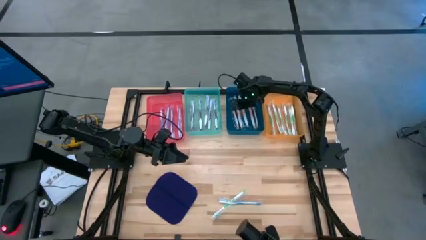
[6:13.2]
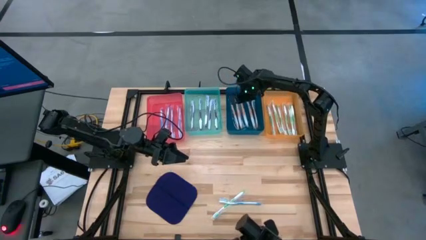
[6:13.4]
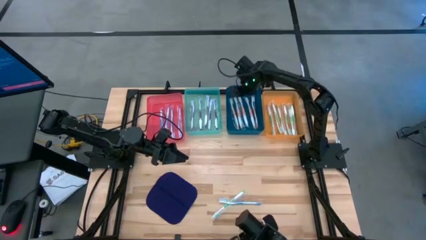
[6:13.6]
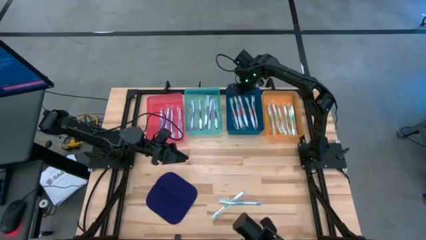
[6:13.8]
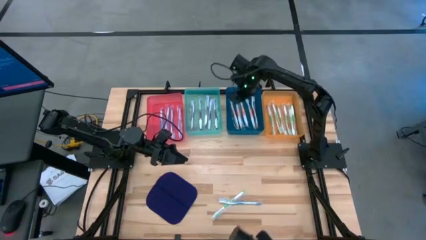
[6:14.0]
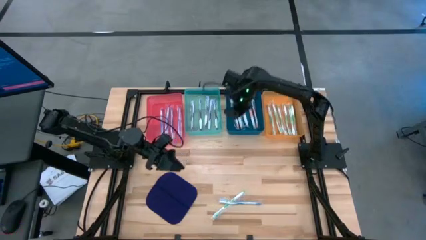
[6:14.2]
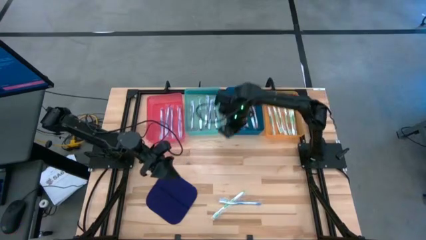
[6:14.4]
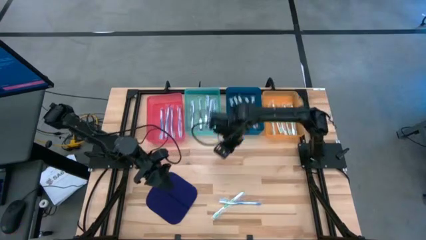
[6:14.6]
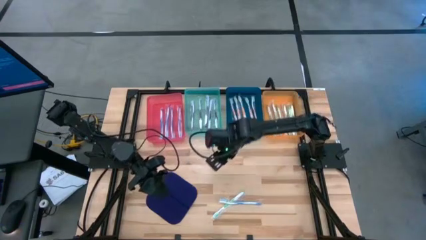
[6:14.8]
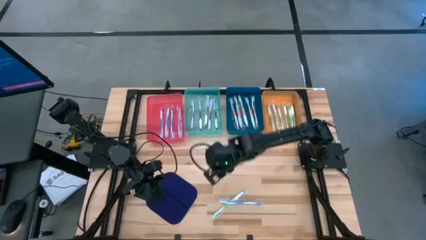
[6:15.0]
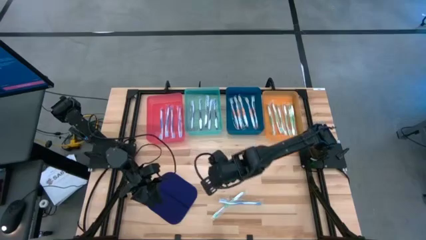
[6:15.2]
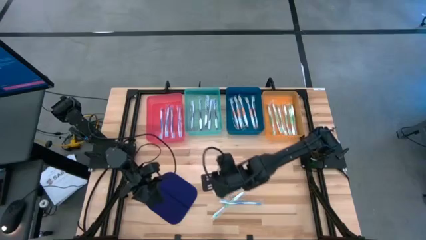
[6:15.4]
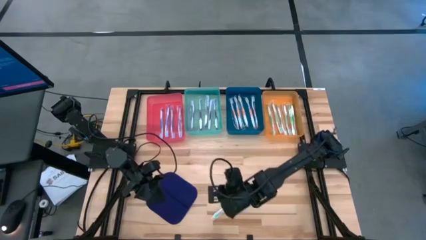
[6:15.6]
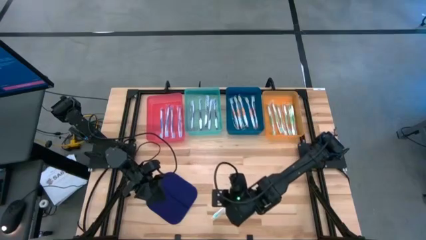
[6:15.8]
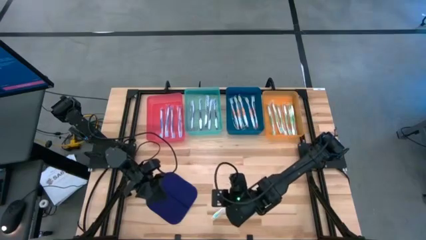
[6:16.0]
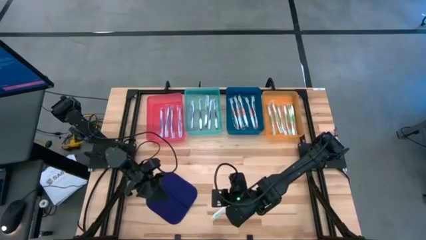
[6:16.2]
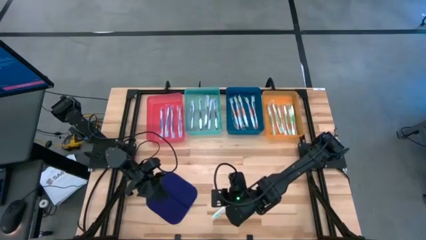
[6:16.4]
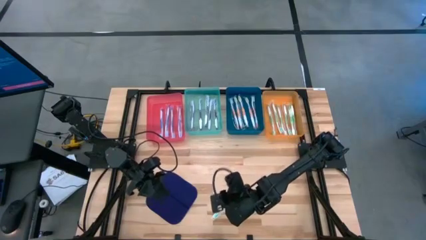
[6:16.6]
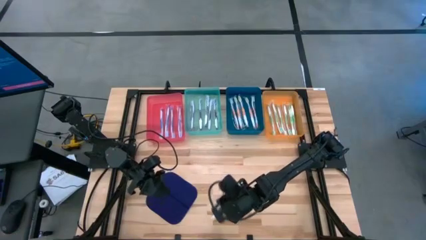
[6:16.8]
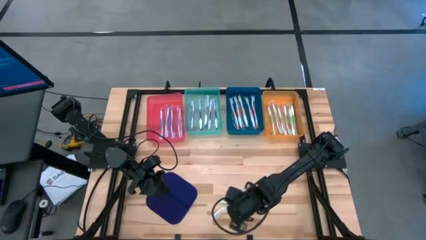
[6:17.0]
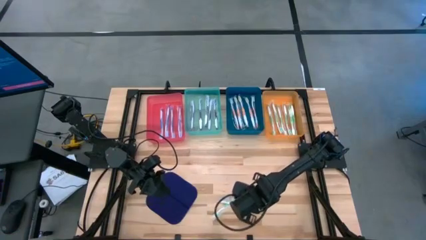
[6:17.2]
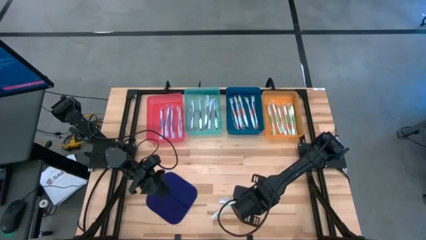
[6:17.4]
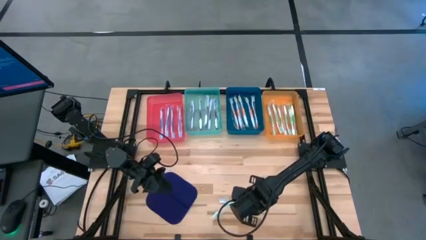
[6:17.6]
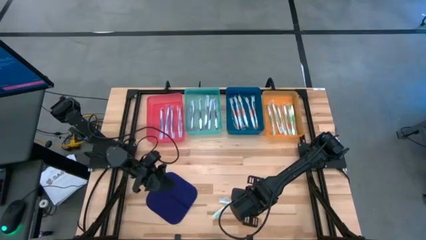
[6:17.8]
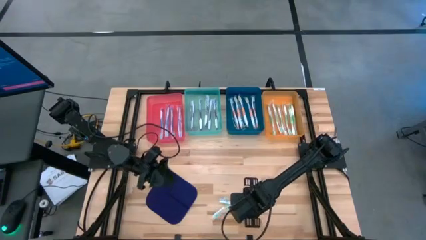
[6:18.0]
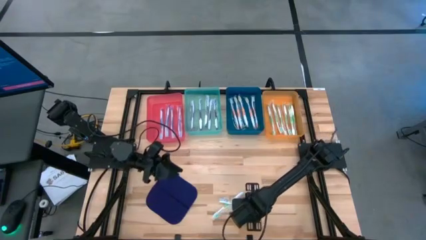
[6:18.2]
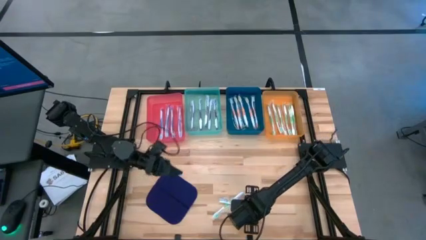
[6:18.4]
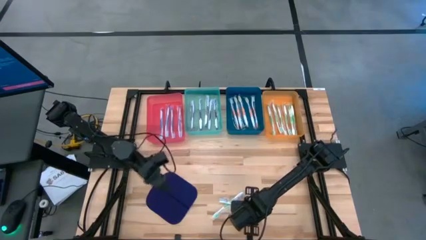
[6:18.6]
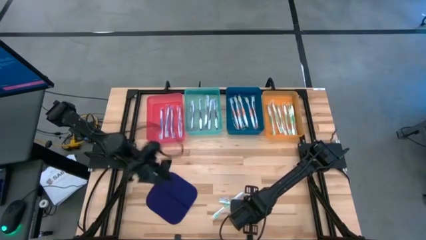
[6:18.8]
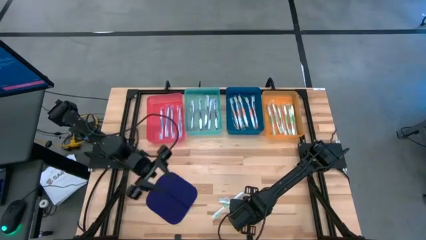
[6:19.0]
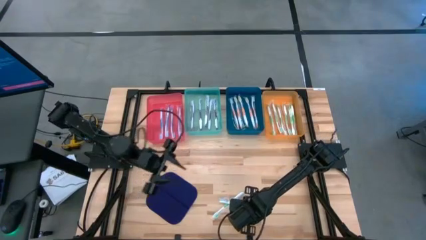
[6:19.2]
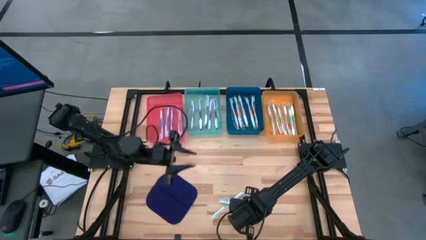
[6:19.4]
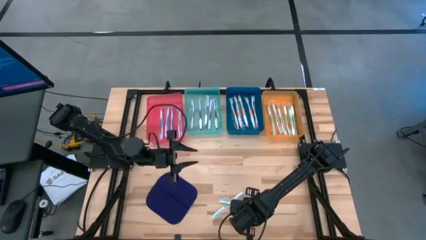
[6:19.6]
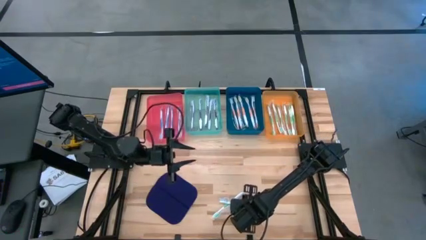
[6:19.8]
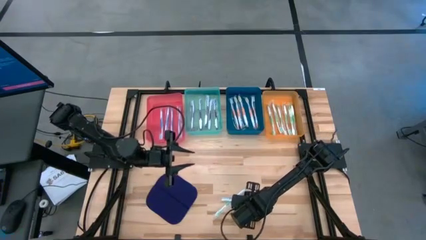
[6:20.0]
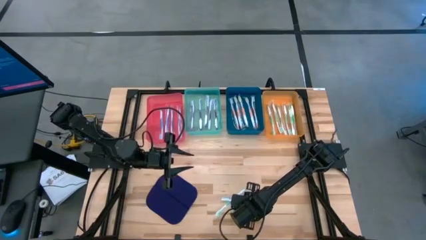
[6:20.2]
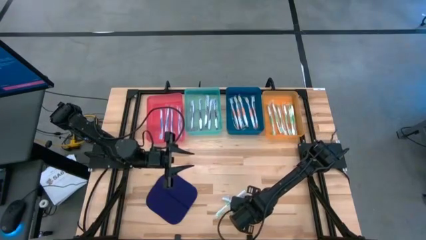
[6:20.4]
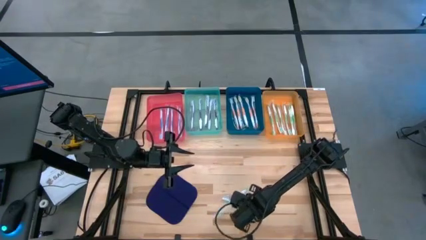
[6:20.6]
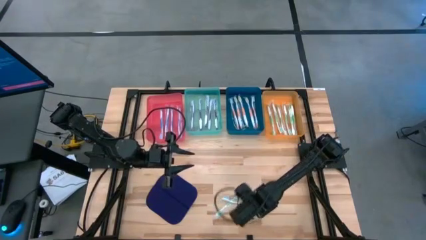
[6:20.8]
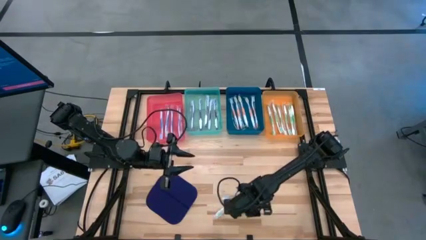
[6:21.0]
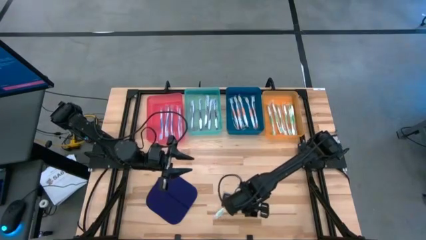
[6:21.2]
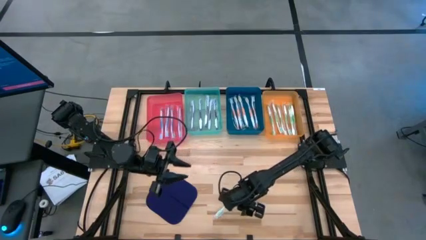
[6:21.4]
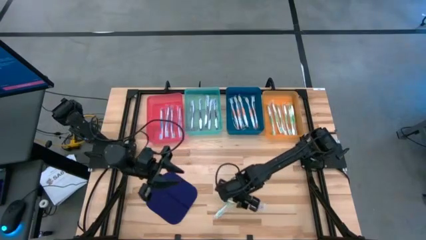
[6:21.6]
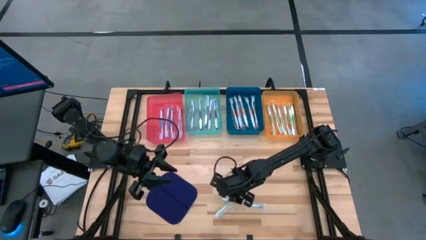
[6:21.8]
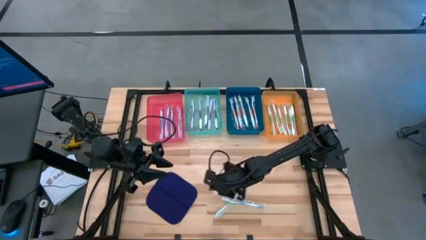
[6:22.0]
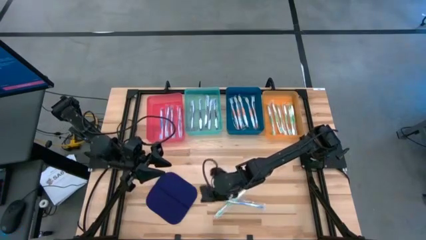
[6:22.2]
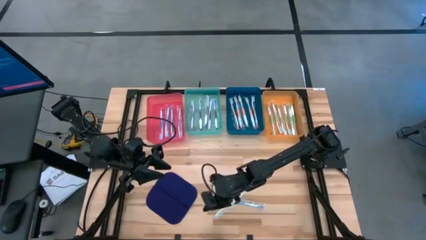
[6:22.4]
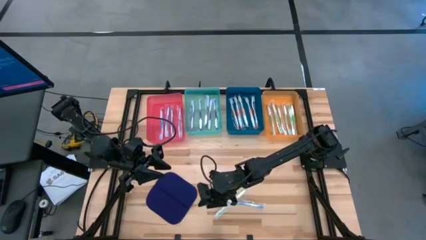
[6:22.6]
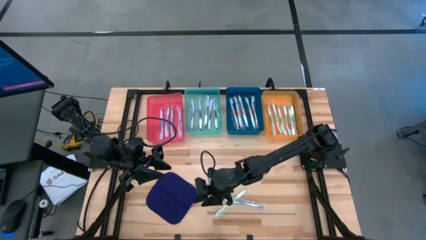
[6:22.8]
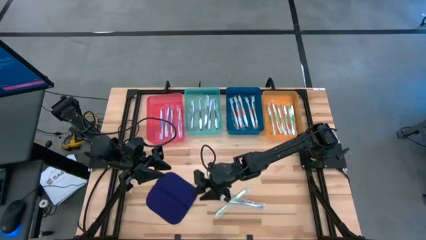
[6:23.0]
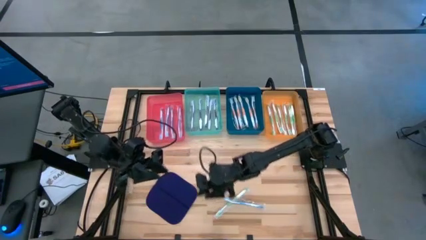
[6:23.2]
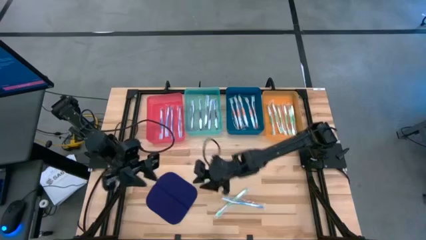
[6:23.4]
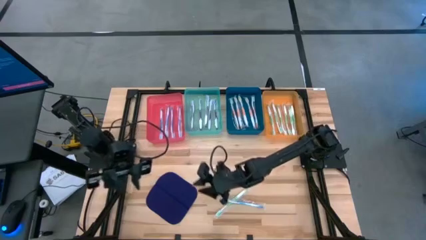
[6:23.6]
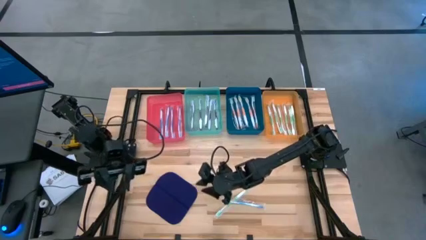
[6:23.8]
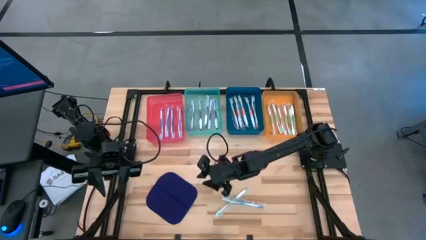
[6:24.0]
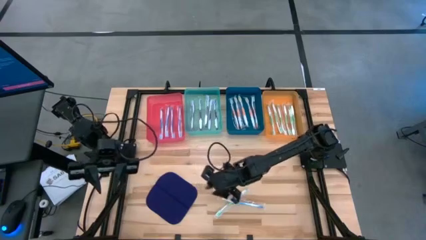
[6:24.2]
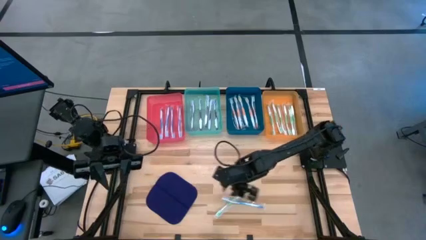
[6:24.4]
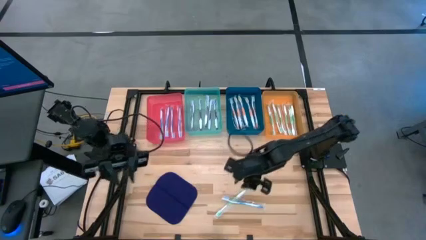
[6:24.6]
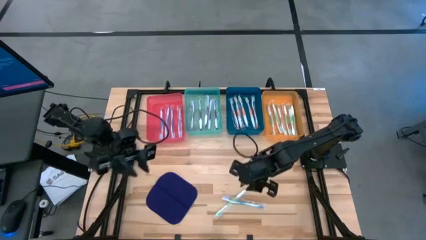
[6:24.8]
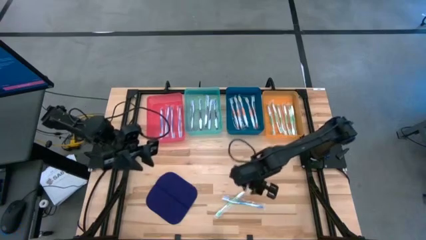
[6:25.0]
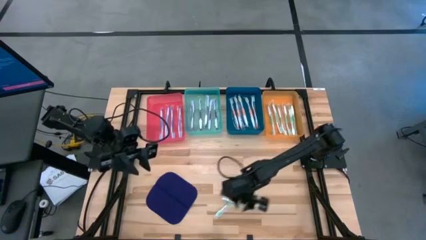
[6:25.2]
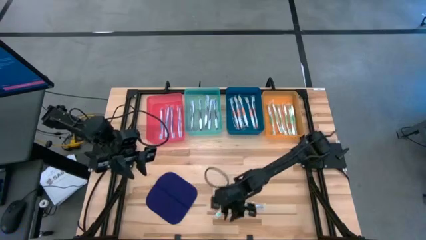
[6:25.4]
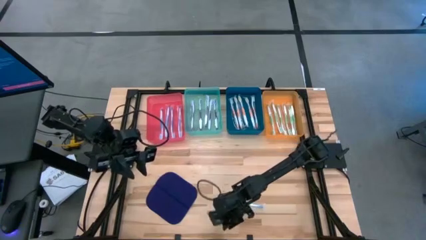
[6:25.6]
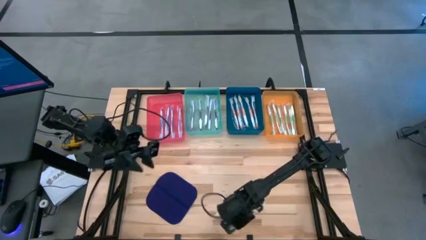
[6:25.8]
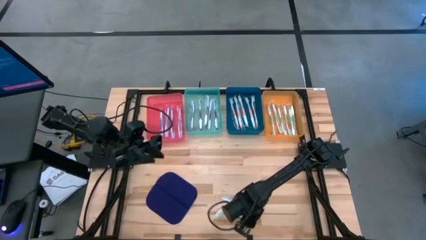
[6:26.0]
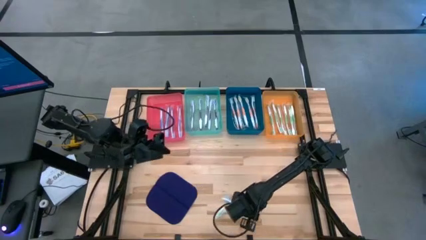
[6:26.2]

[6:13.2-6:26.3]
Task: Pick & Place Toothbrushes
Put the blue toothbrush into the red bin
